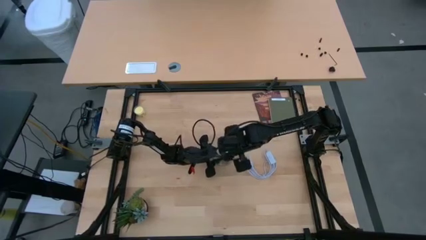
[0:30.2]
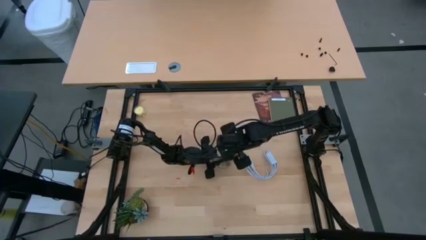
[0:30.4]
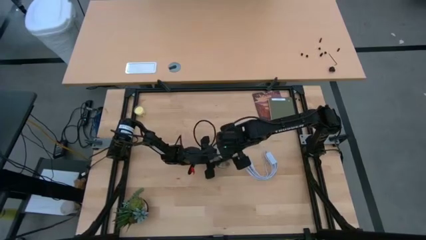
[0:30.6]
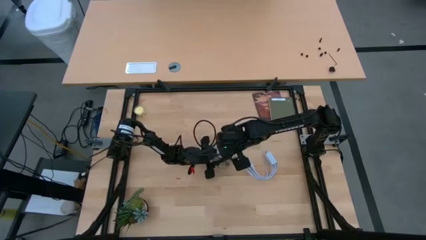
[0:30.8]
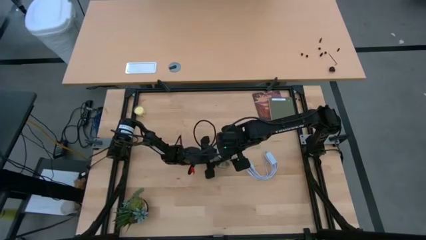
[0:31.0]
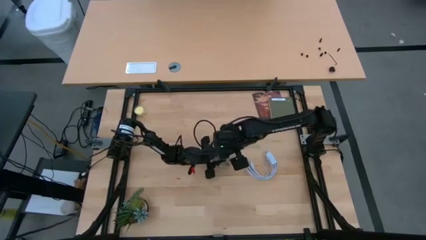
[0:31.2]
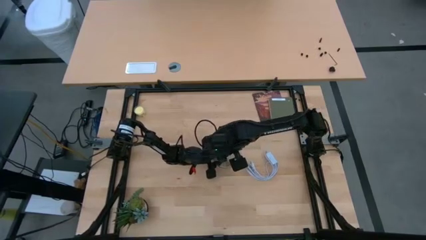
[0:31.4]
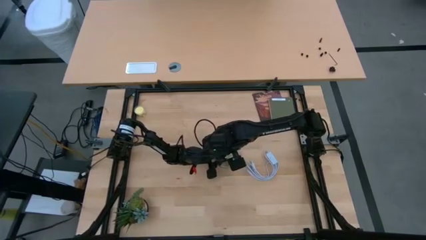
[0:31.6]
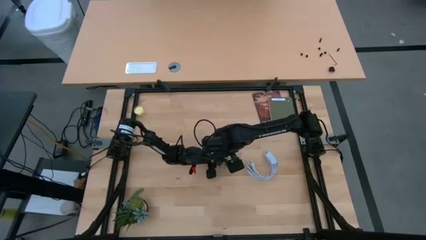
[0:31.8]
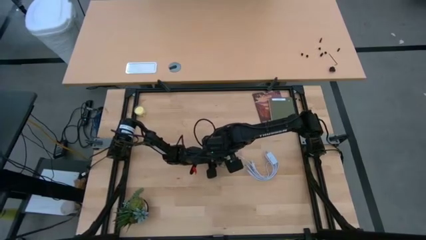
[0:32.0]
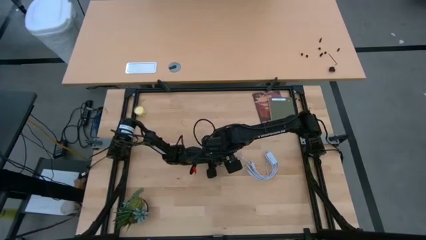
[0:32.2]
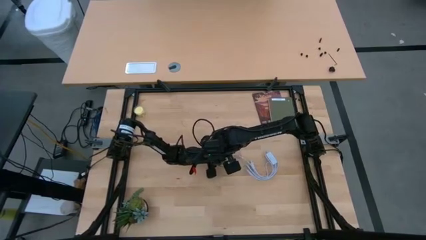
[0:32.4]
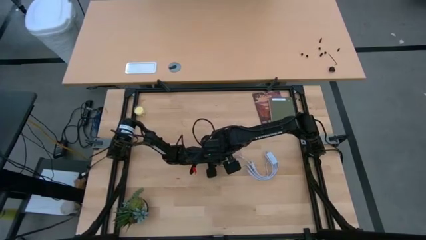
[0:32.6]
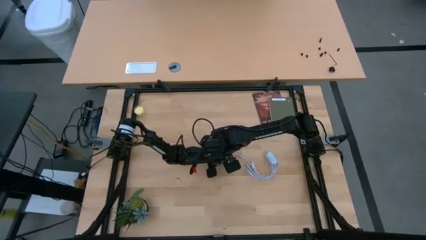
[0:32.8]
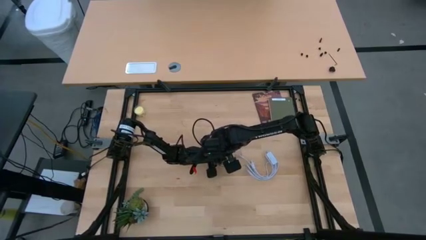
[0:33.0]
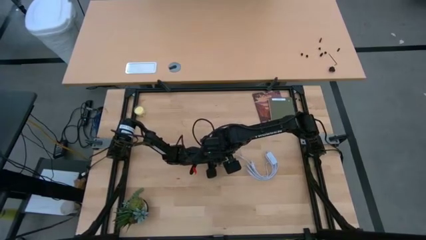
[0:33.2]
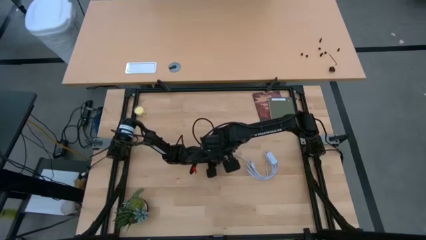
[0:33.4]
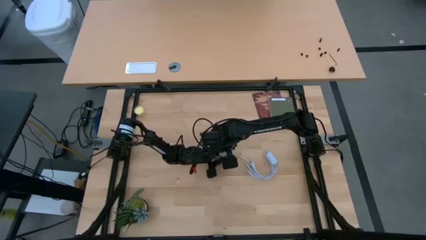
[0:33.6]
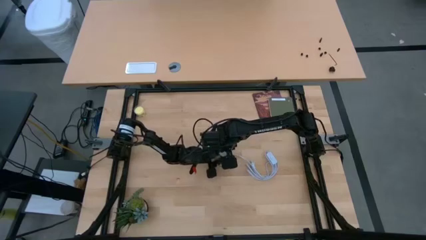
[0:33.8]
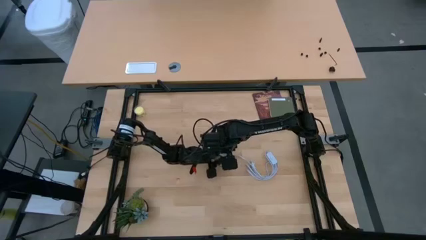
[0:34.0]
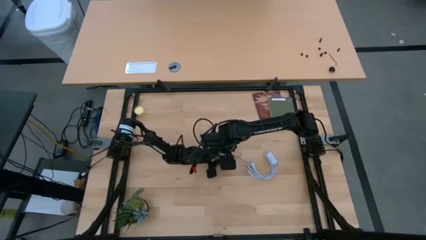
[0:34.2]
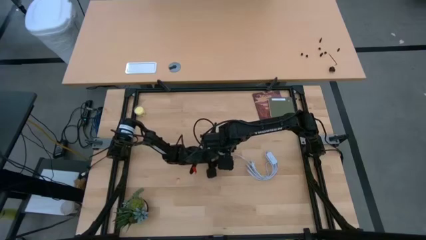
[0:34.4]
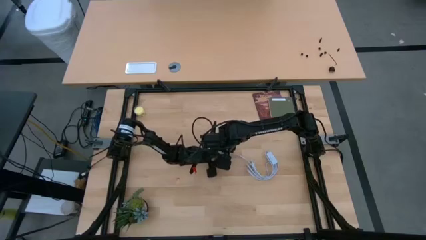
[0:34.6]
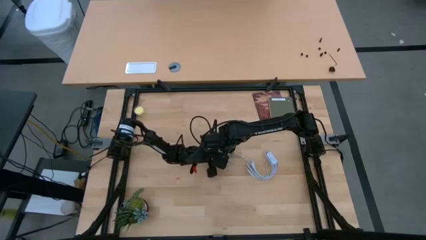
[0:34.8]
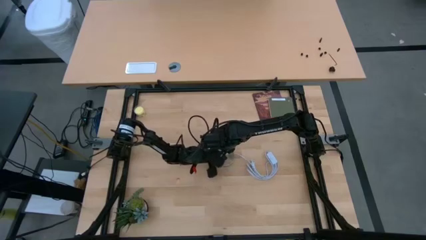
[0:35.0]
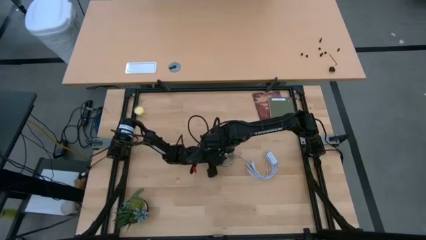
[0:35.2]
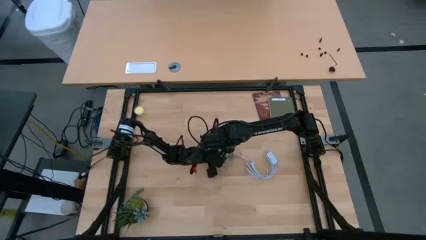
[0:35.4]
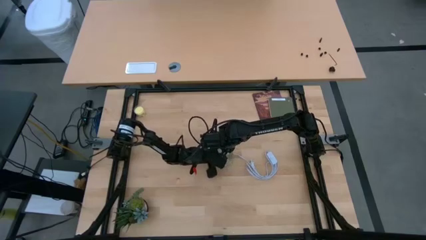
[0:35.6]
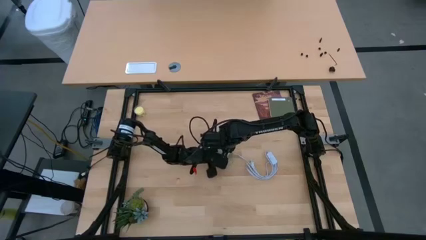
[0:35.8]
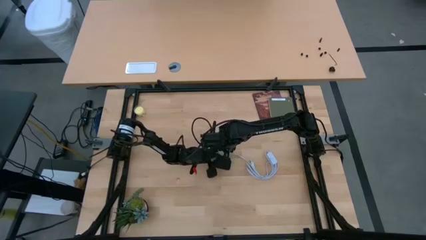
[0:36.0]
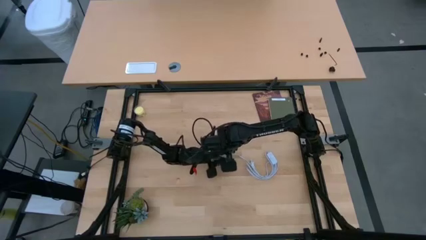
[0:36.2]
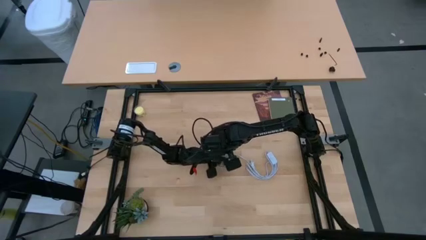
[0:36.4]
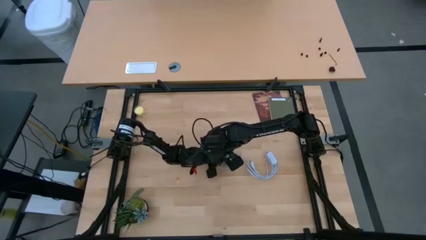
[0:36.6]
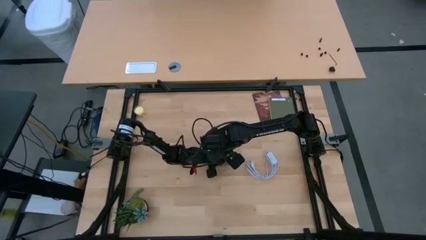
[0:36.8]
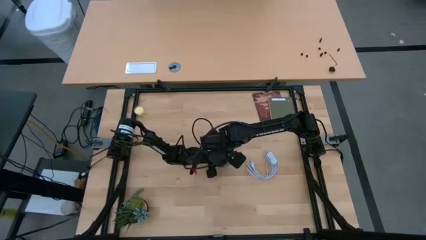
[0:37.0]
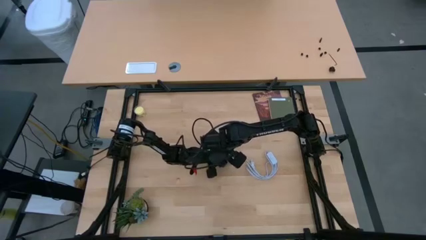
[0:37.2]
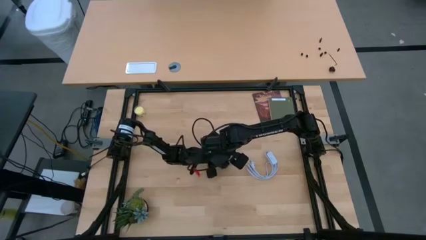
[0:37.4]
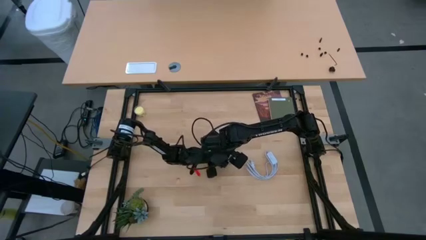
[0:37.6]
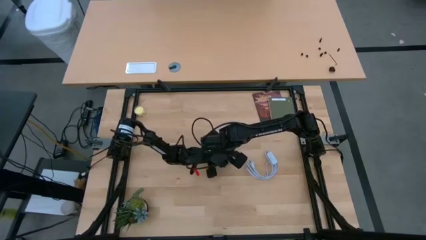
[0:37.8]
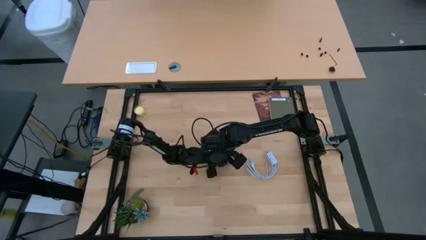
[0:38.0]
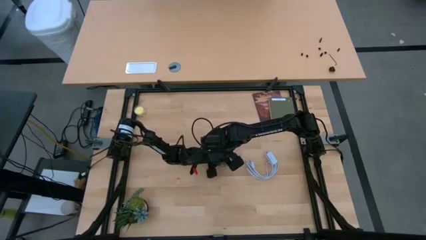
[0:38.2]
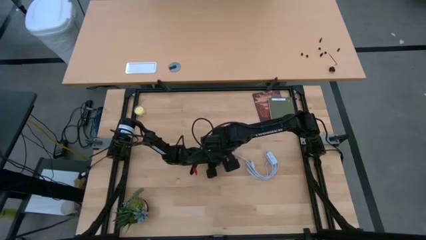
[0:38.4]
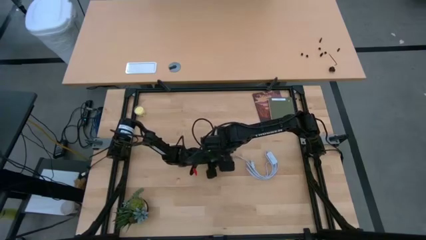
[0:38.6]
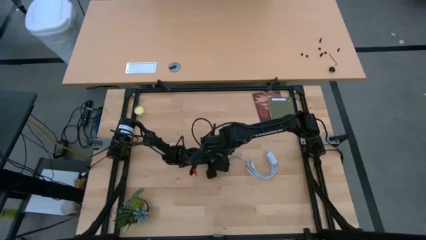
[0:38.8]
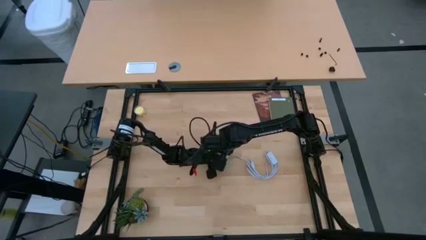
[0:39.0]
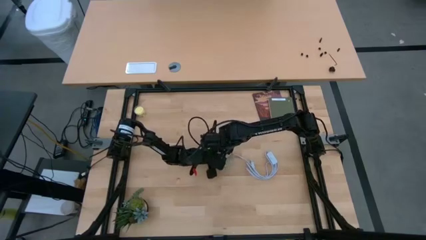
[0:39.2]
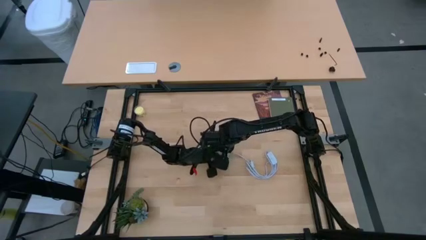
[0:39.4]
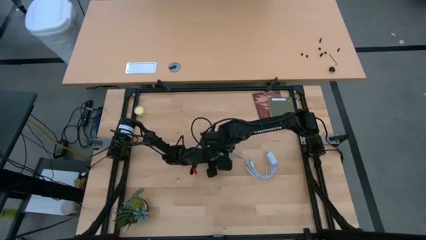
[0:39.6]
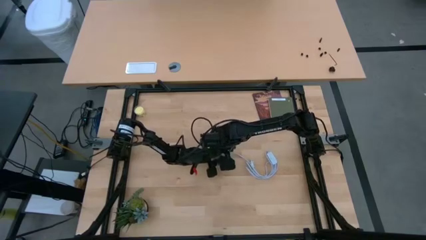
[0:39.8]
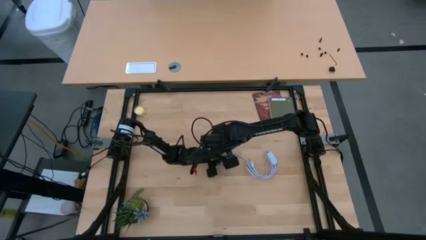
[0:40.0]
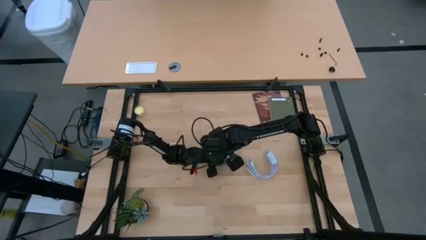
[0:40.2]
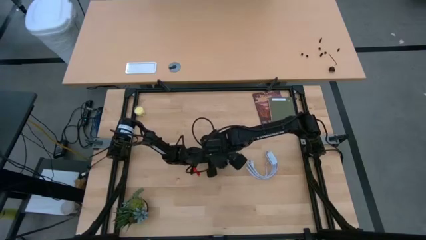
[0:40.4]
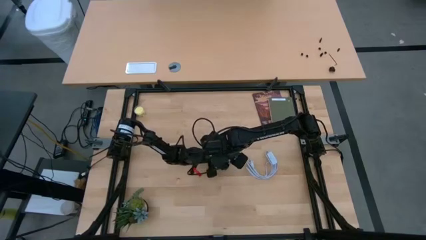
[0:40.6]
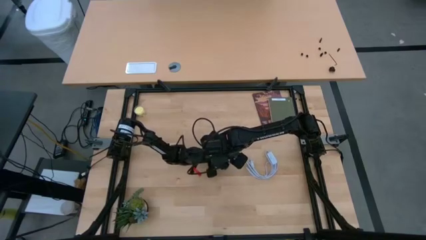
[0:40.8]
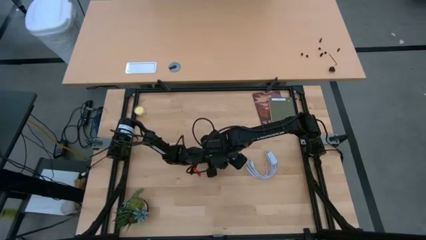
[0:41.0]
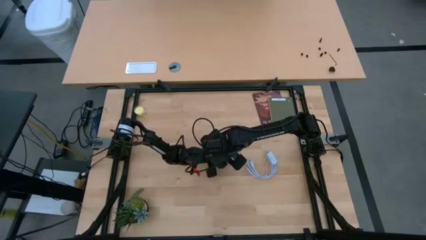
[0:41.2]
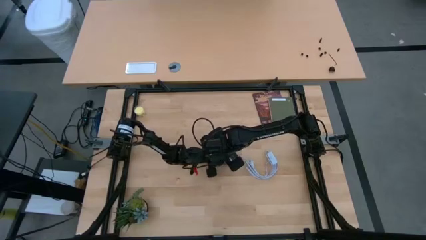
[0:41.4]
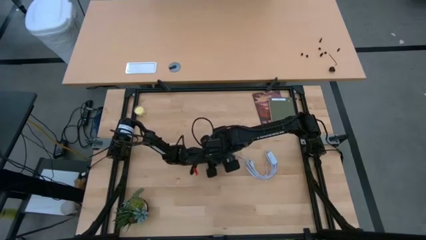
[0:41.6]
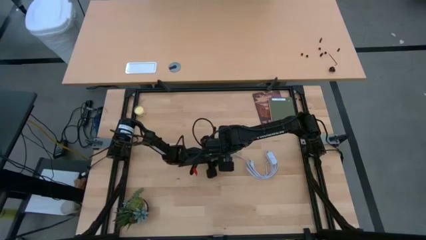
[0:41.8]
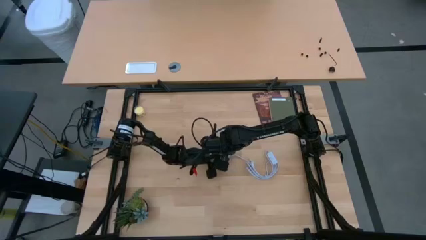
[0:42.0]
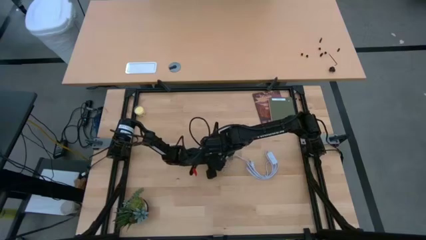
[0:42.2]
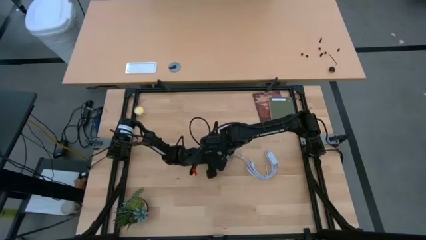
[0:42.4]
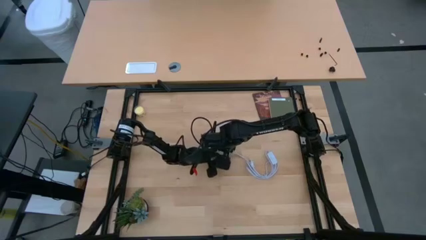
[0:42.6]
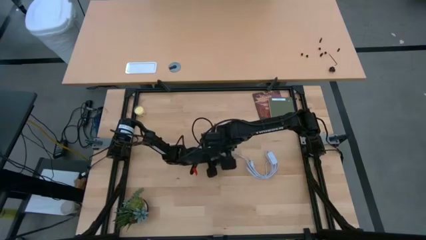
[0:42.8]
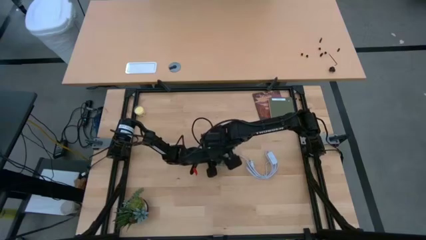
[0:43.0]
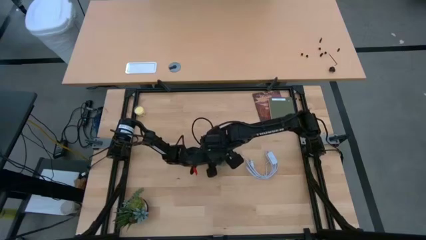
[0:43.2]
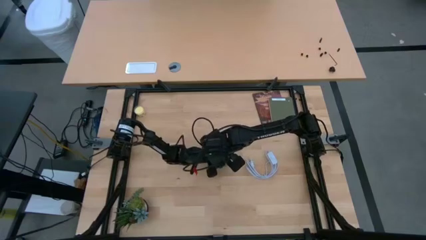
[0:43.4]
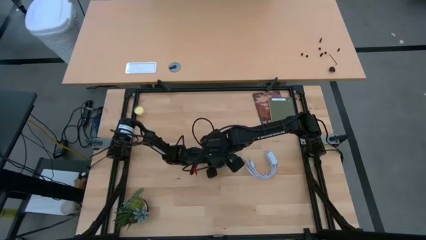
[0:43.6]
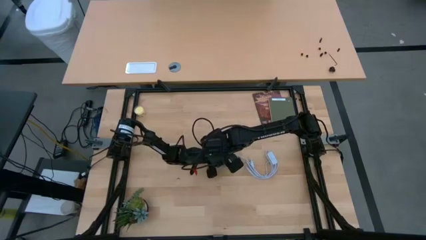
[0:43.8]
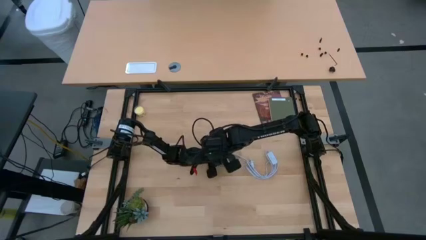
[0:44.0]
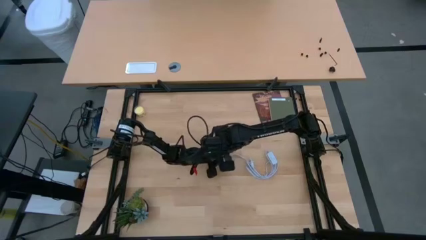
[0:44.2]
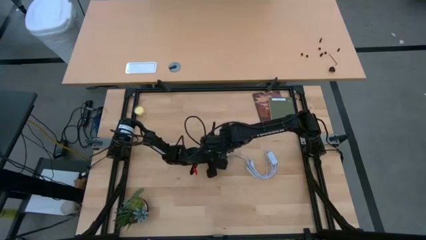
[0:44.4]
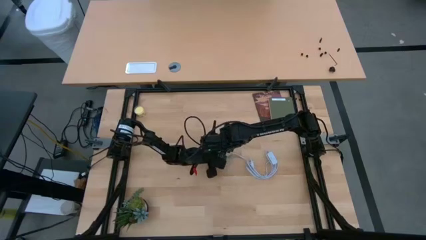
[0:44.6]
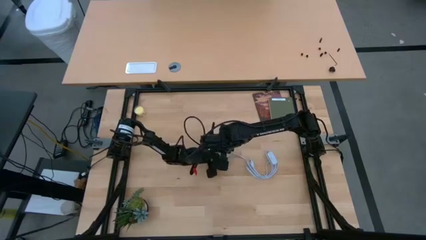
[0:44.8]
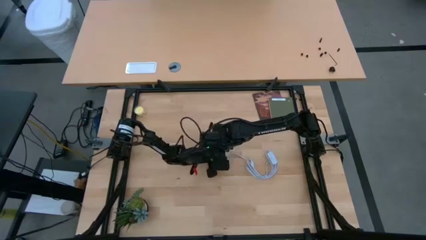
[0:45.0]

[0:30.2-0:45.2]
Task: Screw lightbulb
Insert the light bulb into the lamp
